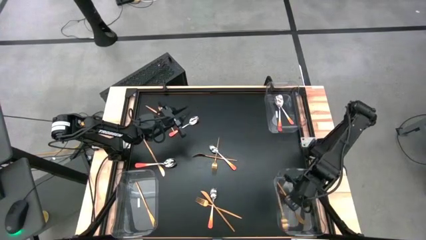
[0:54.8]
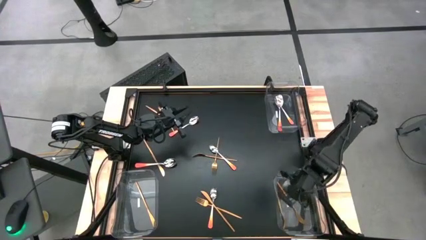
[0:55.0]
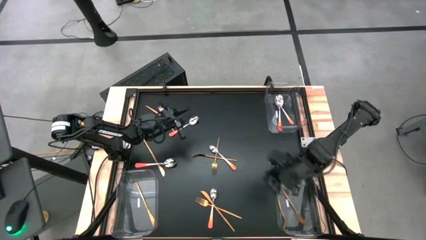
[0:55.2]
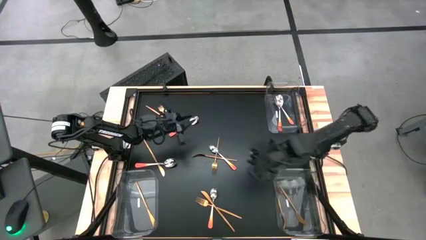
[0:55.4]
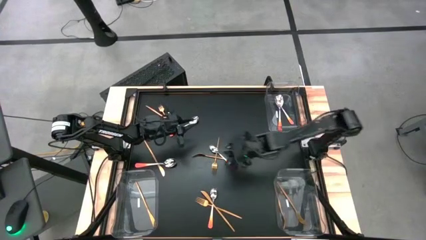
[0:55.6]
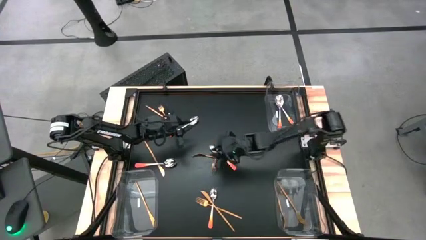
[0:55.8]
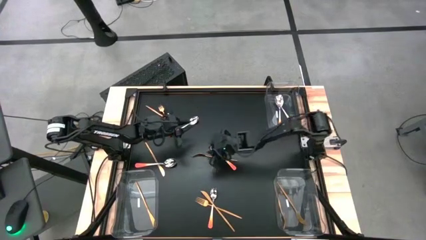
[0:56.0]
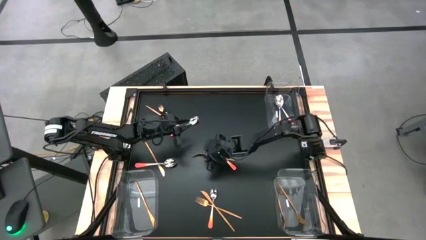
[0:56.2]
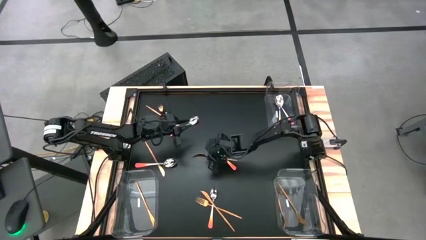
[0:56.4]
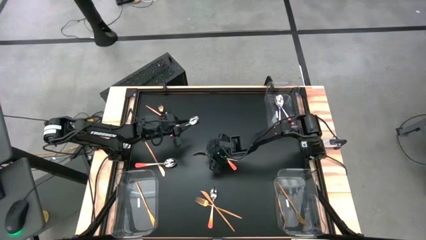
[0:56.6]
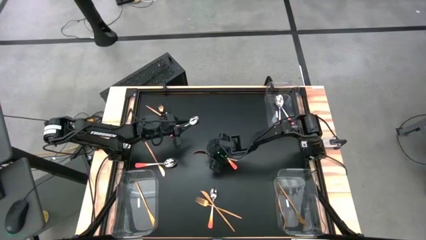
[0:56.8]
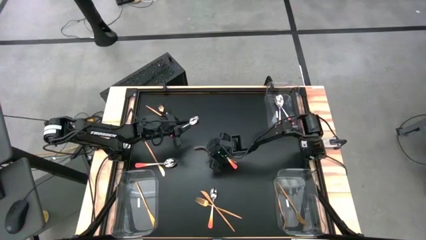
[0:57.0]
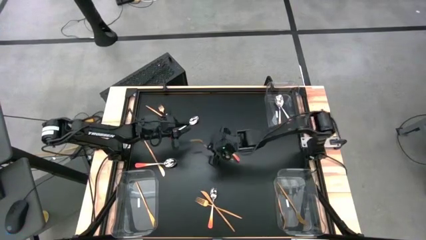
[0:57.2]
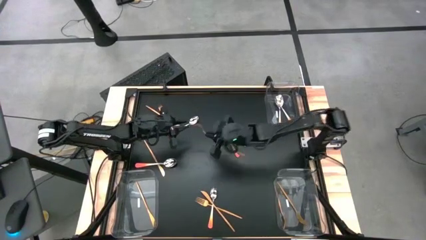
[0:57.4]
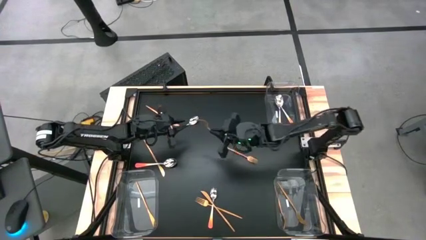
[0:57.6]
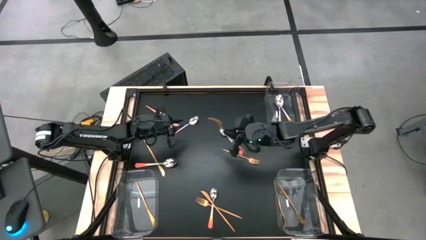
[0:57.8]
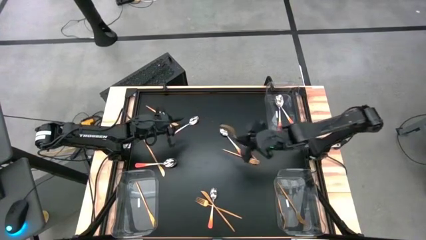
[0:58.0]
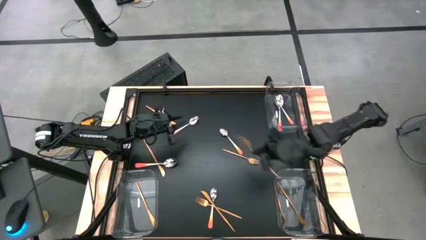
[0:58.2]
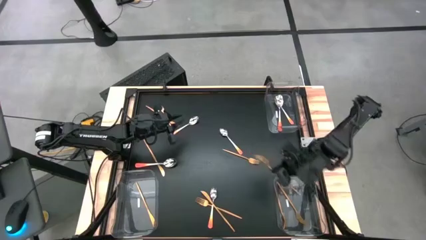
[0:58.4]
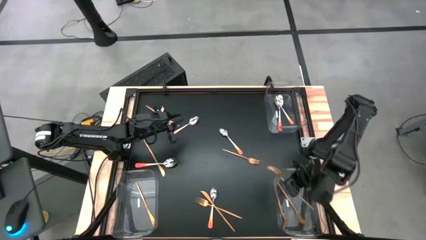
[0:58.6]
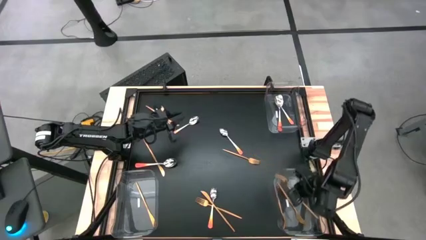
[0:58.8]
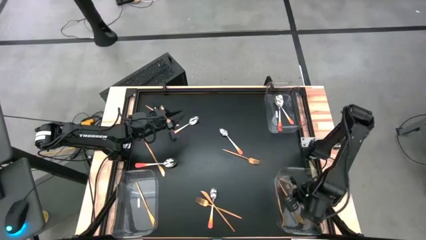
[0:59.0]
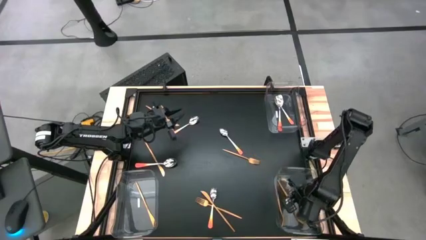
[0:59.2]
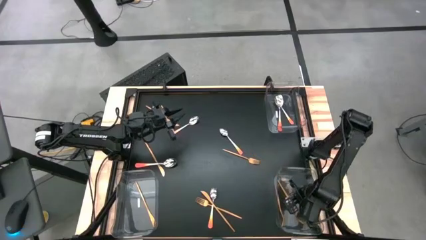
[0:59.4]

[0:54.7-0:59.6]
Task: Sort silverware by color (type)
Put the gold fork into the bottom right transparent bin

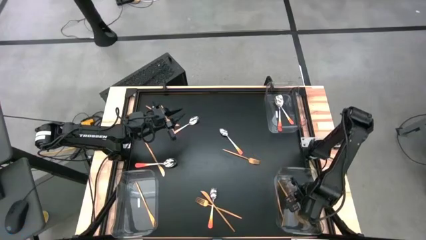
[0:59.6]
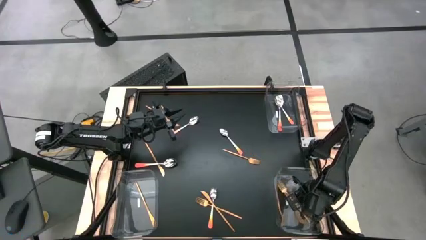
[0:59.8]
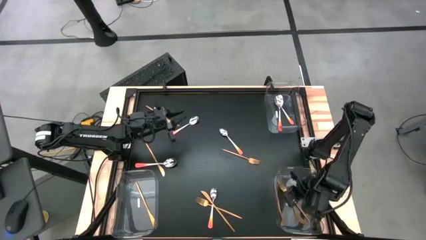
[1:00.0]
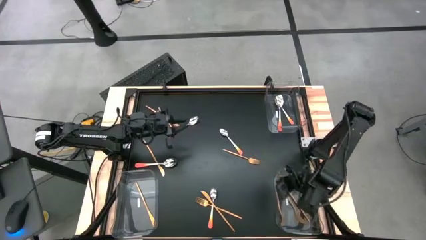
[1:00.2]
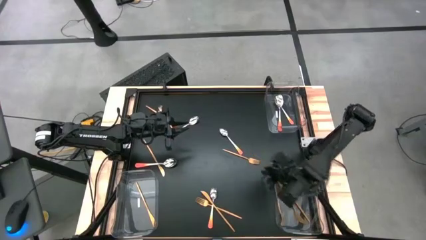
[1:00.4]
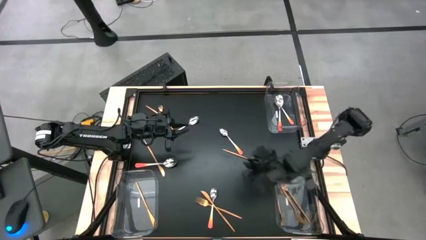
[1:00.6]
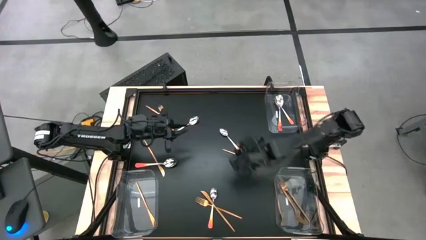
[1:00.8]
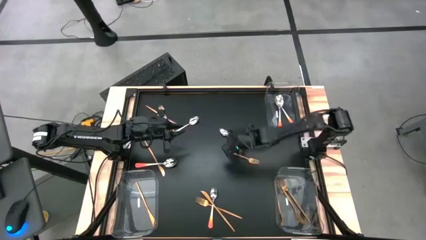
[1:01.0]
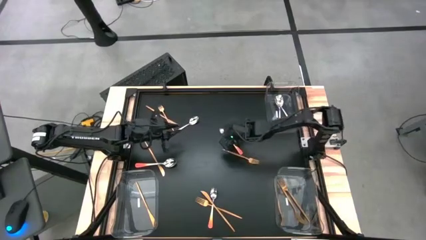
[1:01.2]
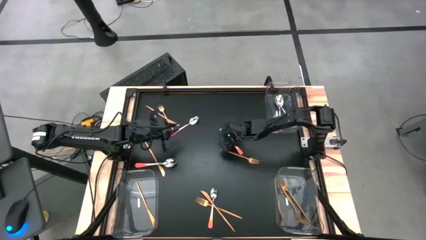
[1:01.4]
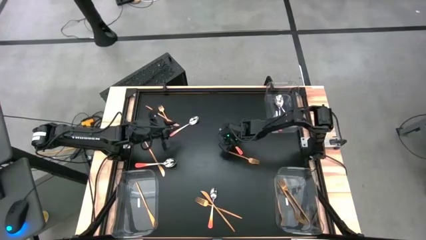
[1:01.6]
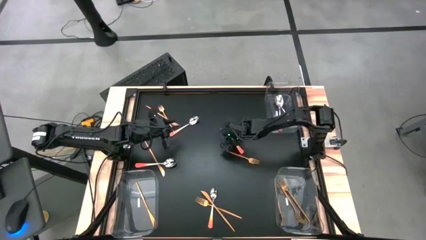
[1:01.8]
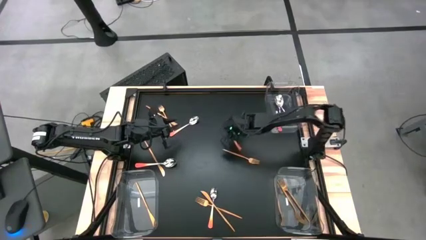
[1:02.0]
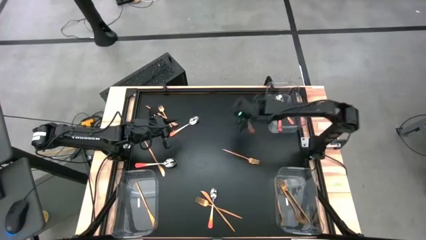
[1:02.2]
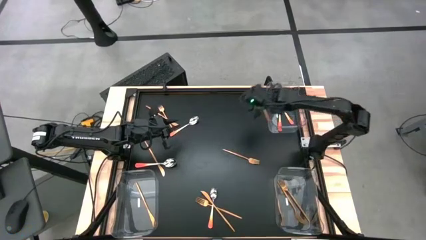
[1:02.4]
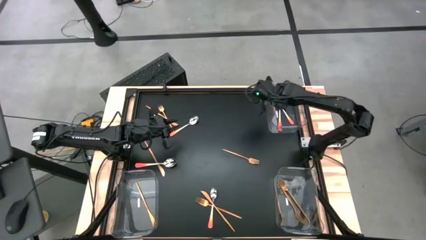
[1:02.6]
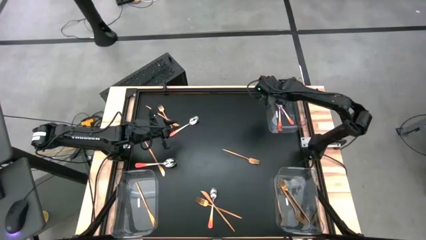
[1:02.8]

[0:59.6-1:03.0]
Put the orange spoon into the top right transparent bin

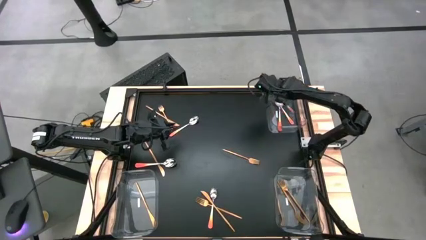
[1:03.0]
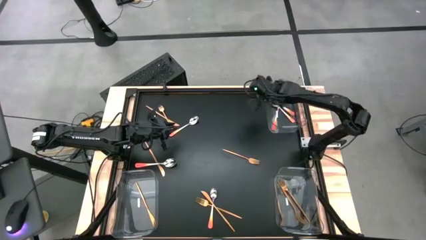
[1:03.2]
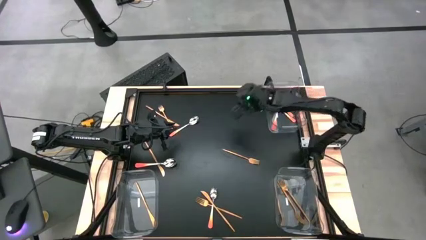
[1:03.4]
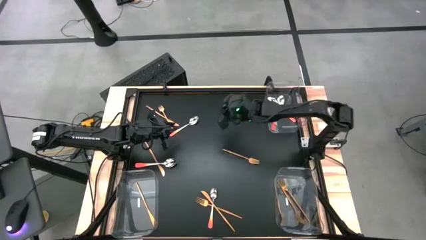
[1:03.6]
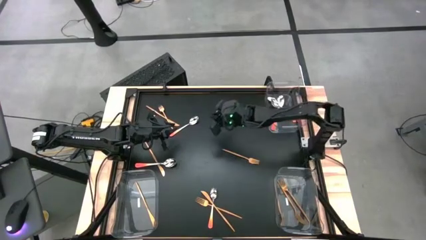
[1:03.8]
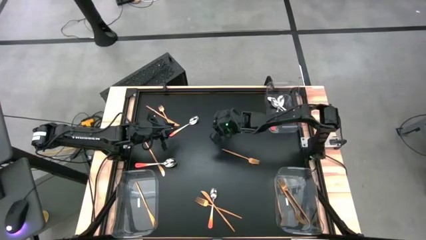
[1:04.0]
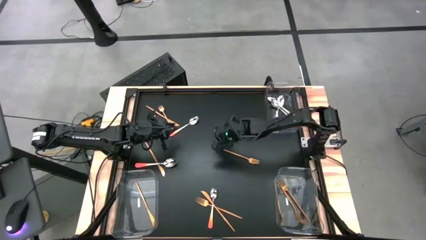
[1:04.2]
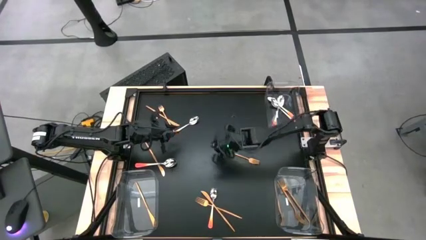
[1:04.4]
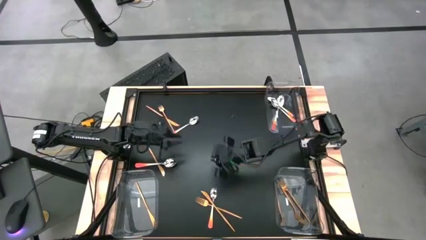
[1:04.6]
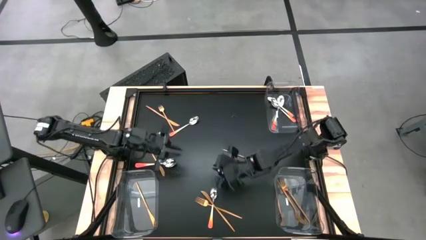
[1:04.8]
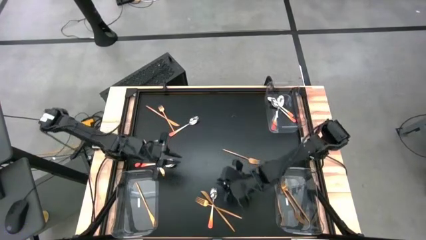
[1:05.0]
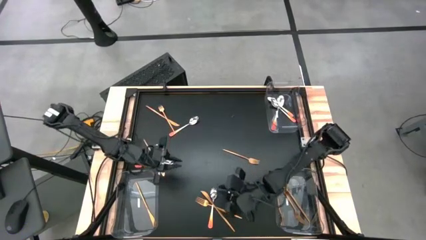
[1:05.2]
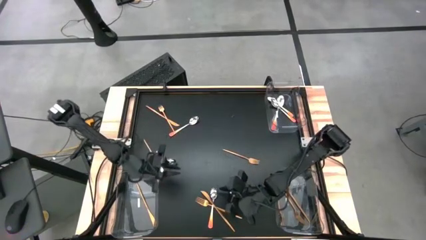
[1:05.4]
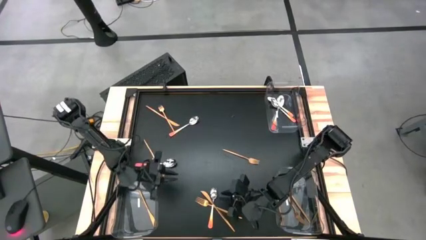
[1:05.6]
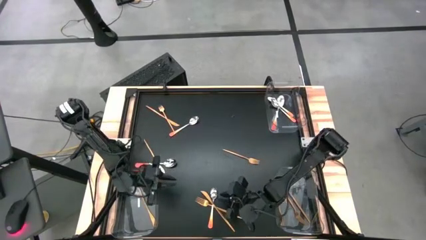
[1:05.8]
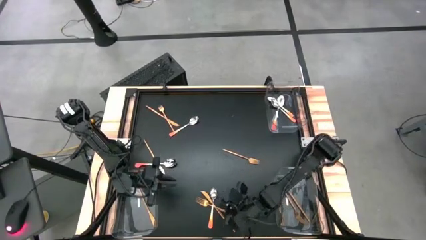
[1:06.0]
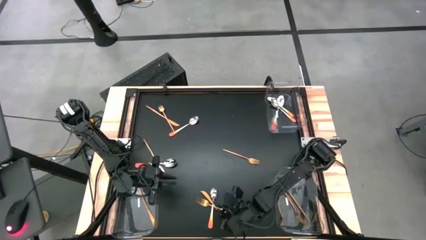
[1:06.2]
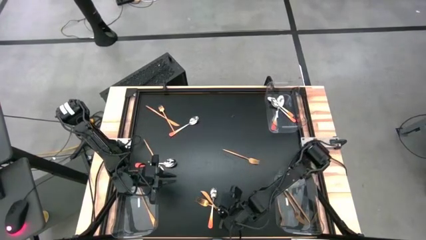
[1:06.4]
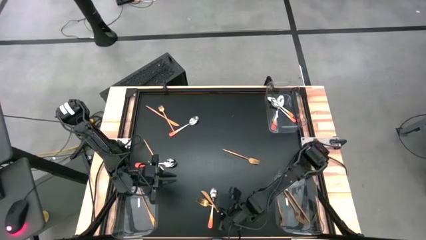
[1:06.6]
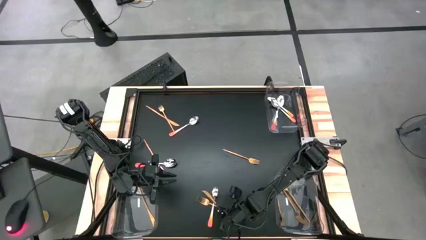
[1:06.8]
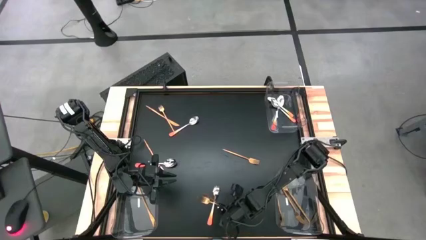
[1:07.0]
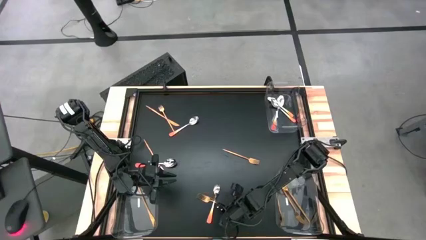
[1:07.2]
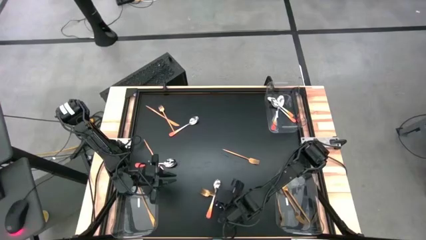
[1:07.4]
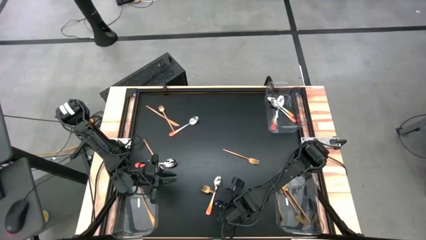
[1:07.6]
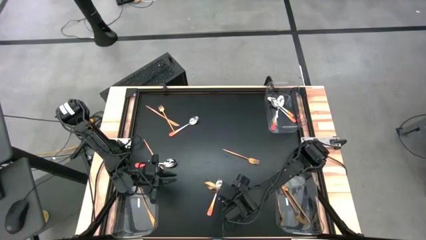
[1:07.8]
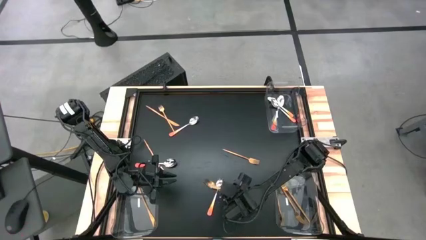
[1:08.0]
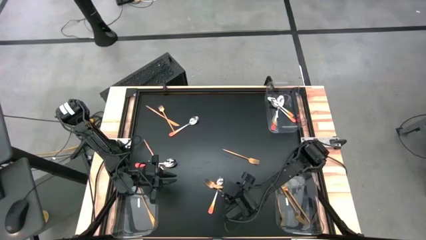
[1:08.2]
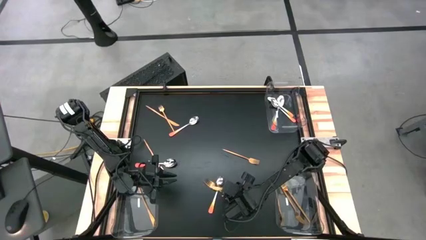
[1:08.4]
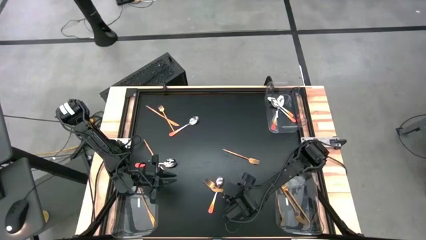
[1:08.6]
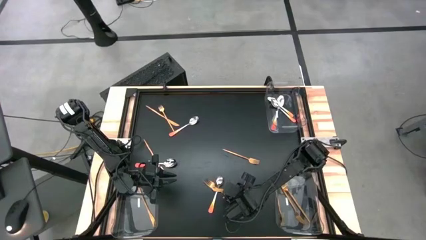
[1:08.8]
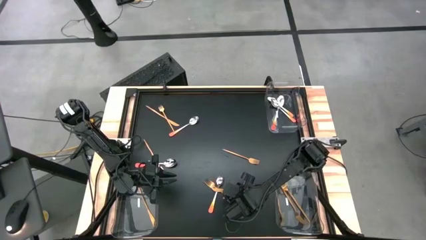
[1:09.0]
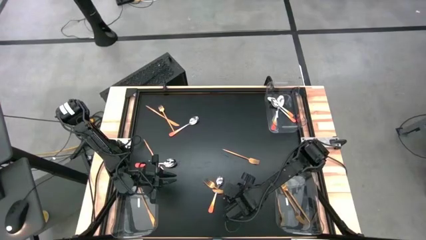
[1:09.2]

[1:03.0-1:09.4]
Put the gold table knife into the bottom left transparent bin
